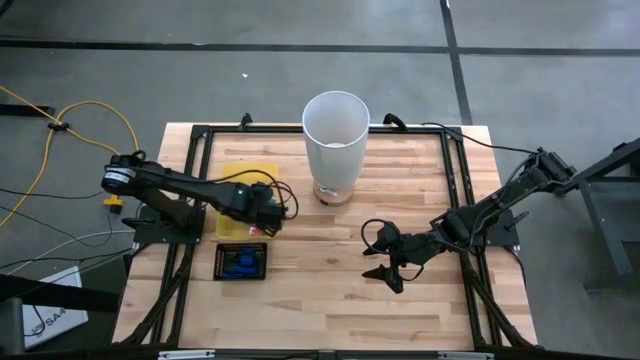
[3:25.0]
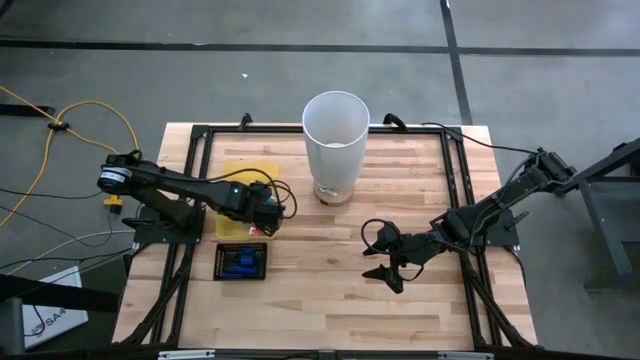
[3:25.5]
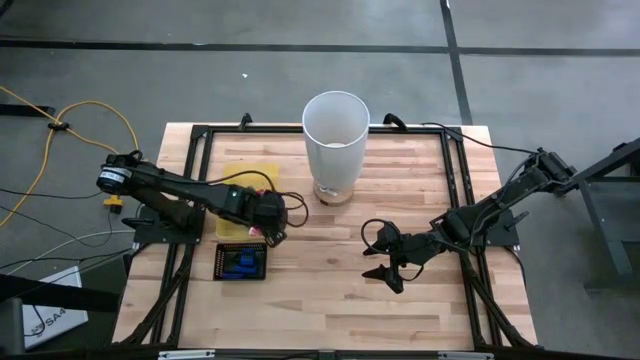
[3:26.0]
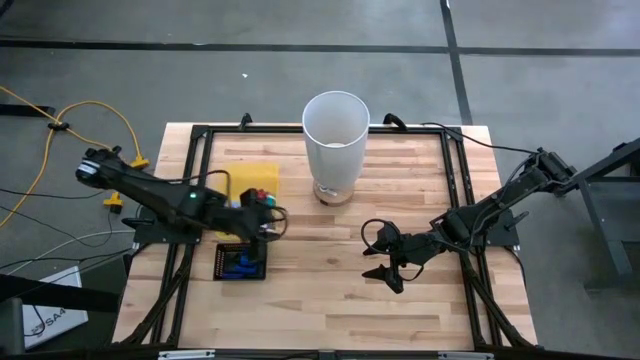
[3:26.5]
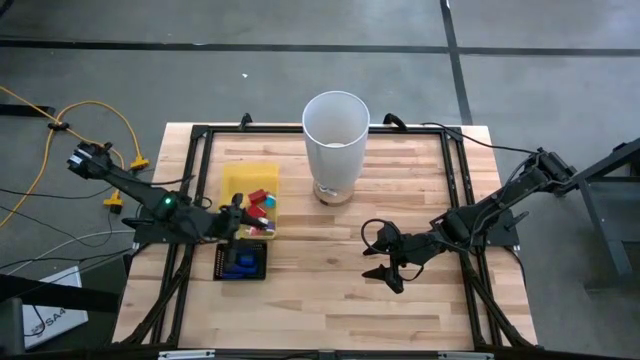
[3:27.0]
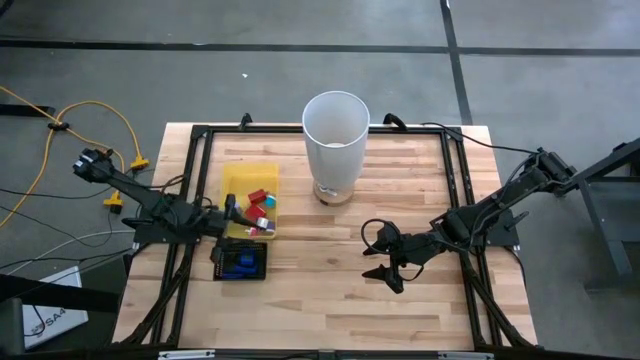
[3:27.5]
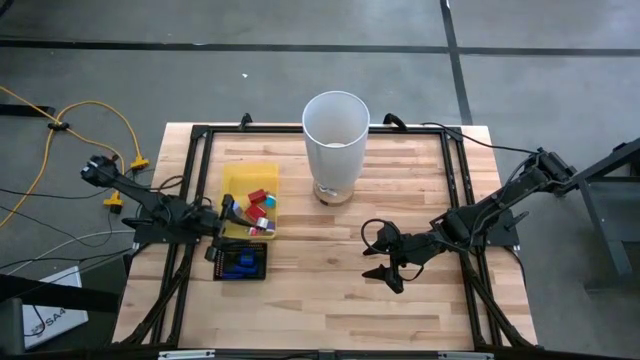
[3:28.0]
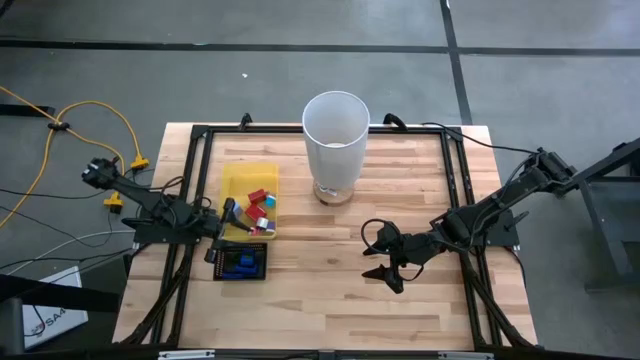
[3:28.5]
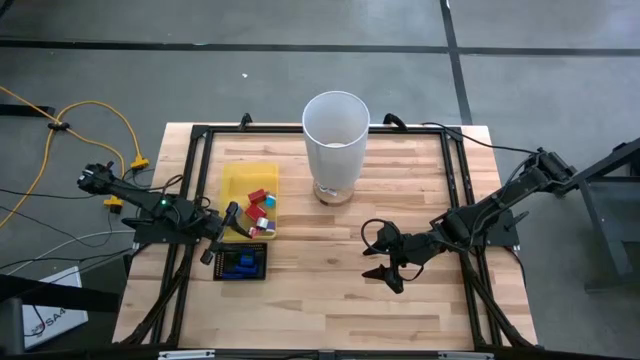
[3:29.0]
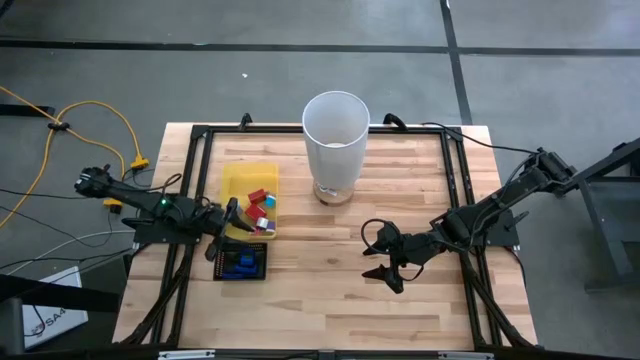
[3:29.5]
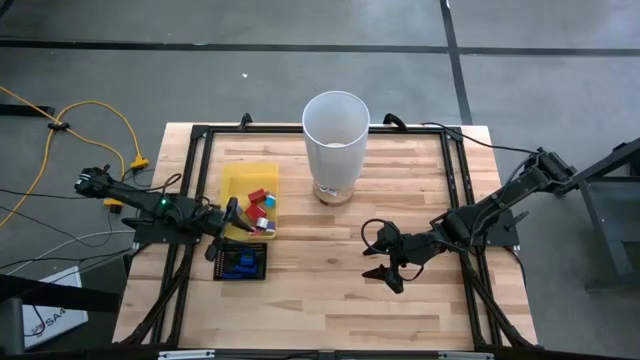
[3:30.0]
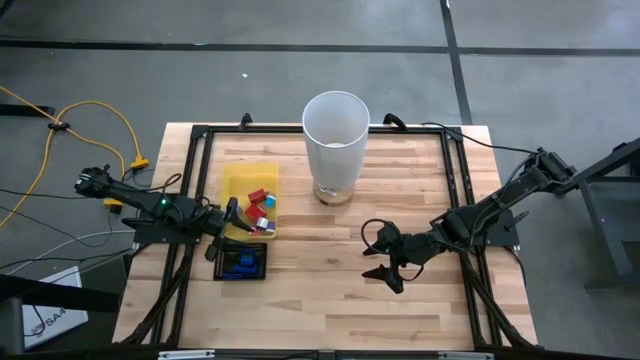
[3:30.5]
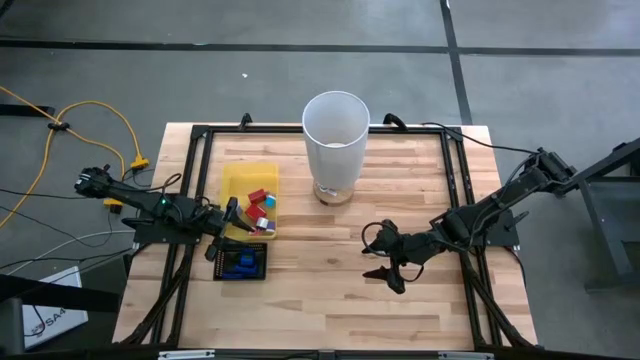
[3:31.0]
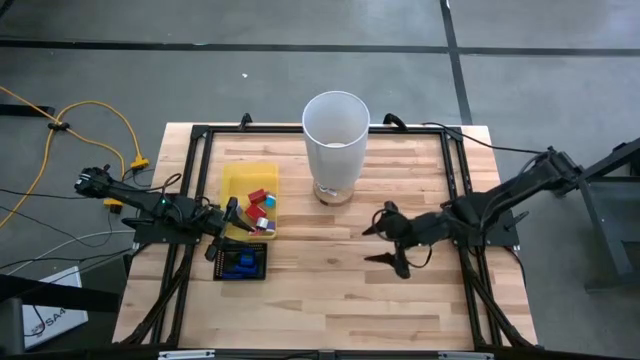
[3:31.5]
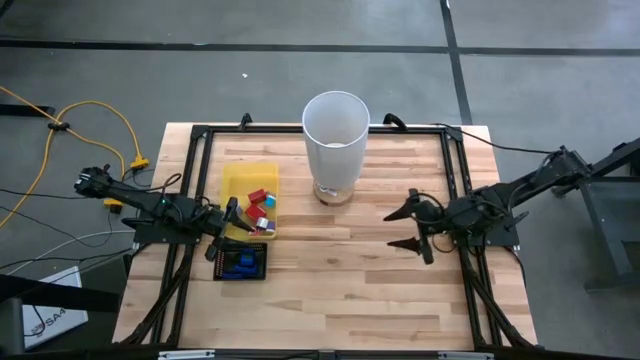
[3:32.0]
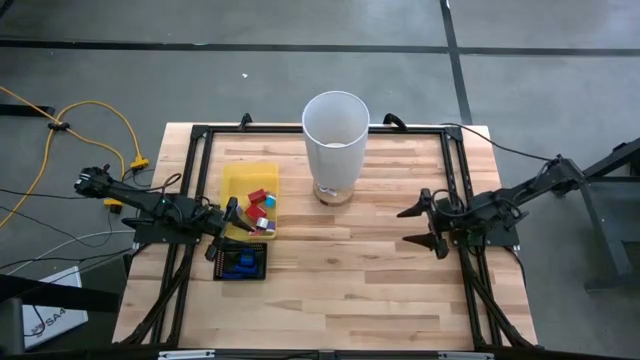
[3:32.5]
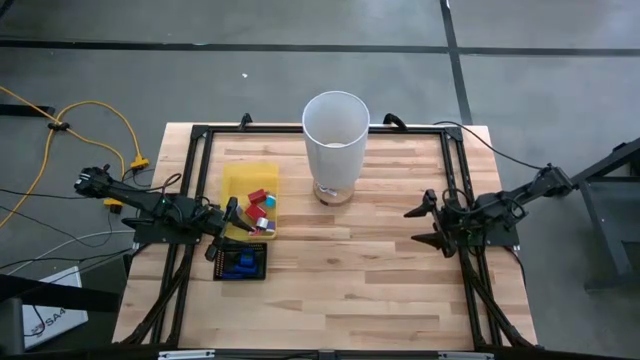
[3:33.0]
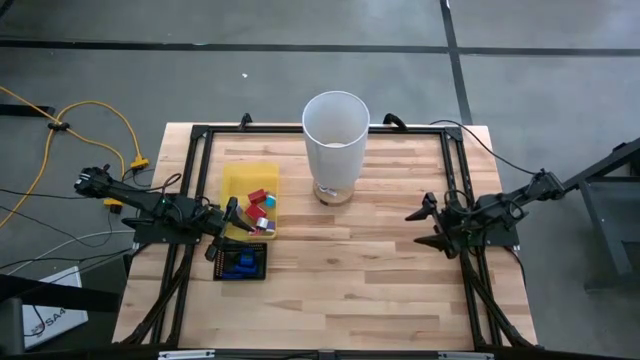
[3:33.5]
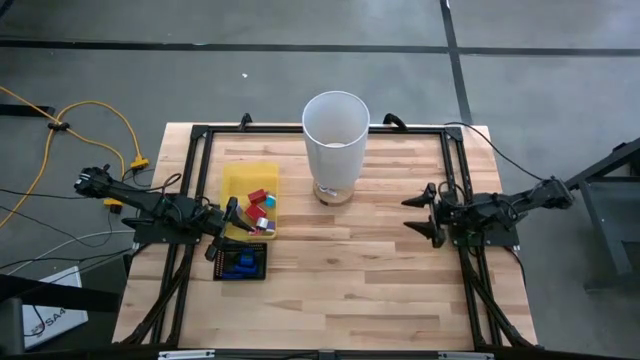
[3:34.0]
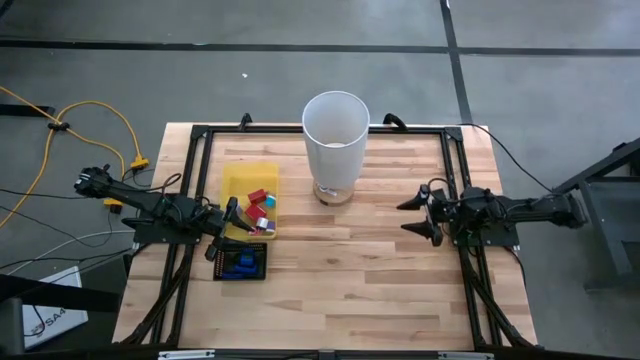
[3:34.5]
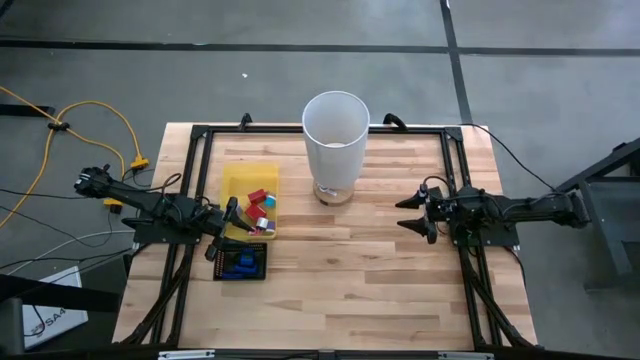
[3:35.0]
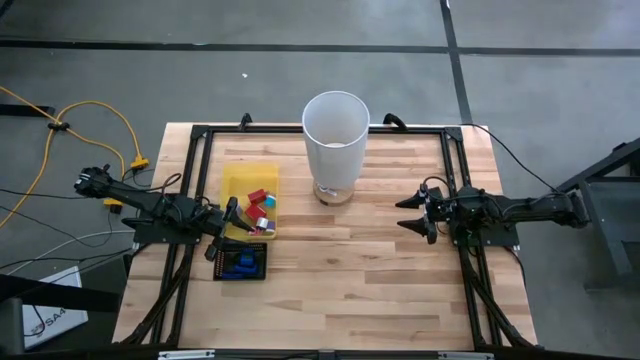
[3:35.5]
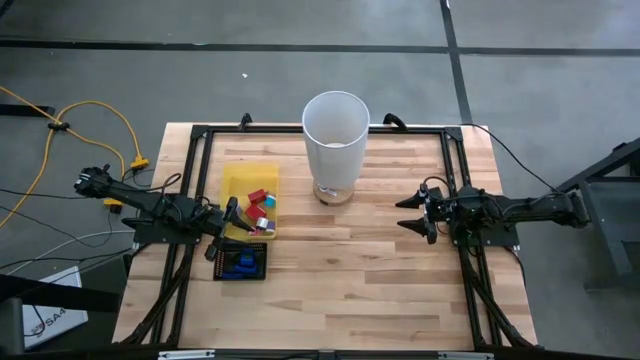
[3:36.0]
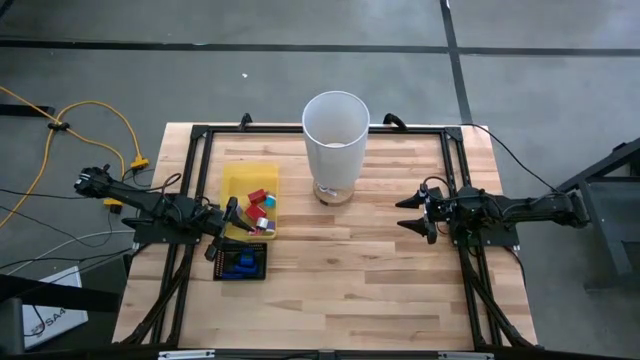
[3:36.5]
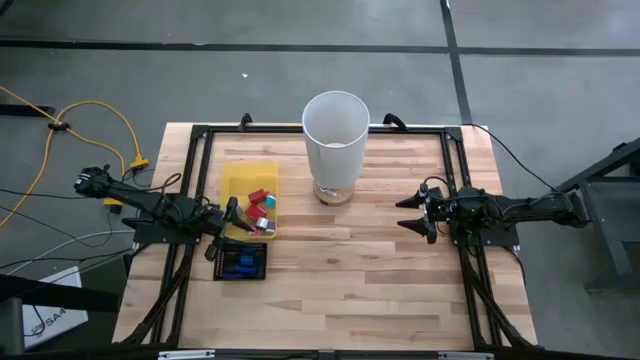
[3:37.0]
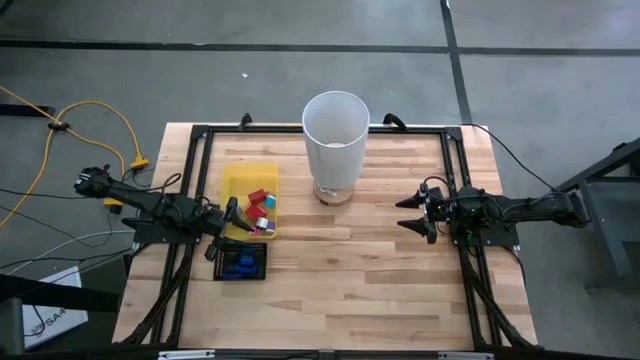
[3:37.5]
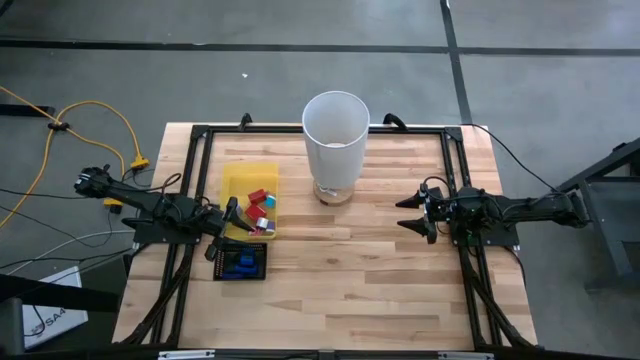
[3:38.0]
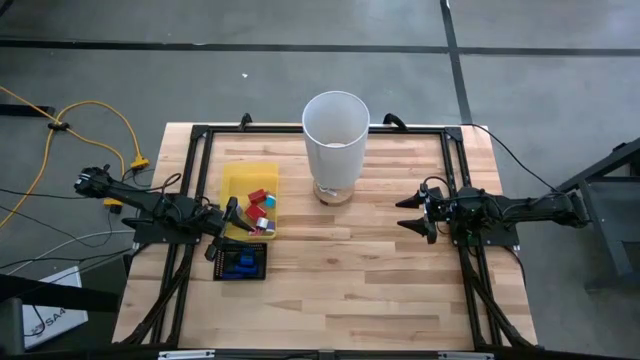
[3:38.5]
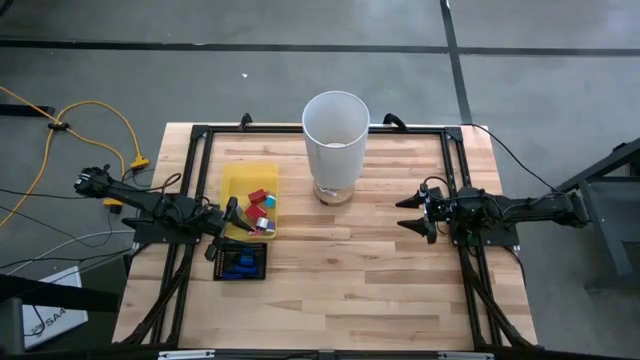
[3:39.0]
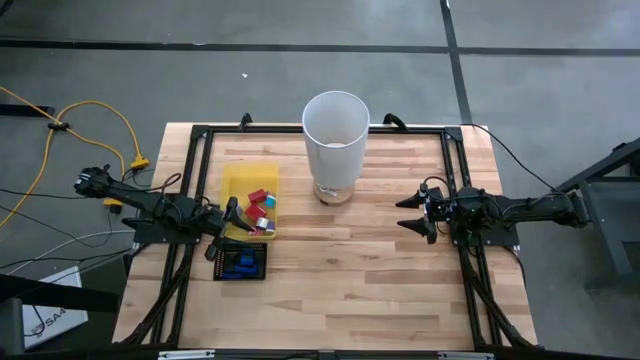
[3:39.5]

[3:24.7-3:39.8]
Task: Pick & Place Office items
Return to Home Position

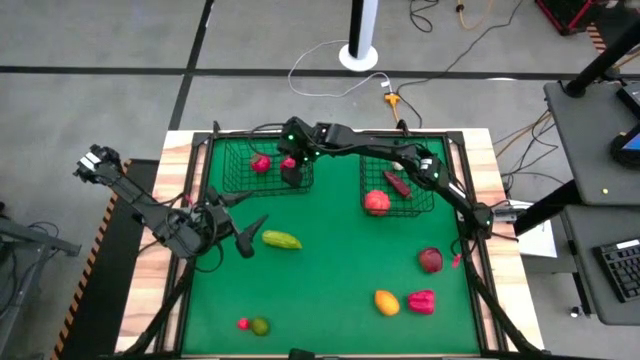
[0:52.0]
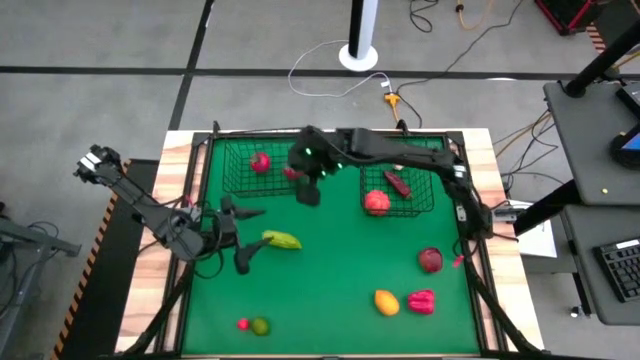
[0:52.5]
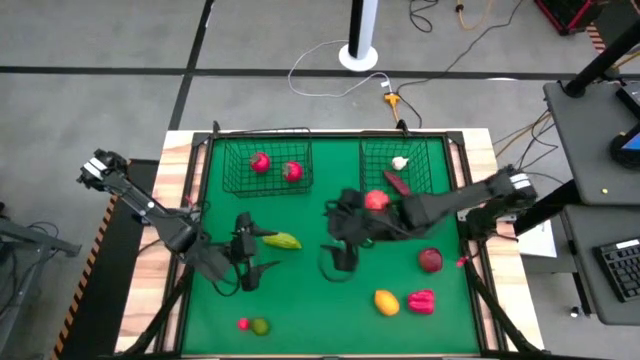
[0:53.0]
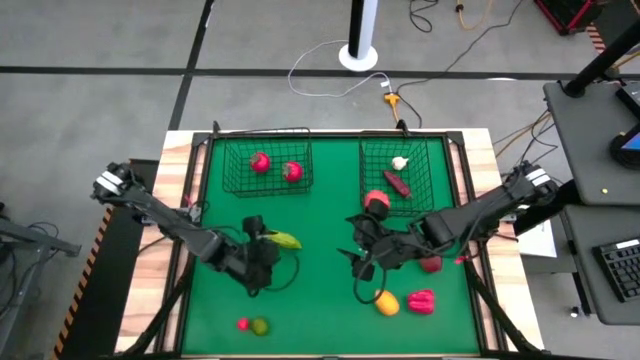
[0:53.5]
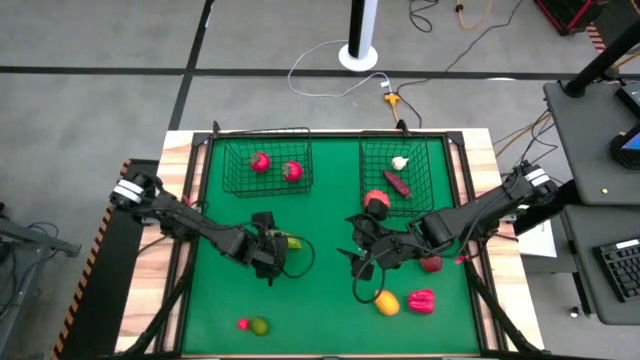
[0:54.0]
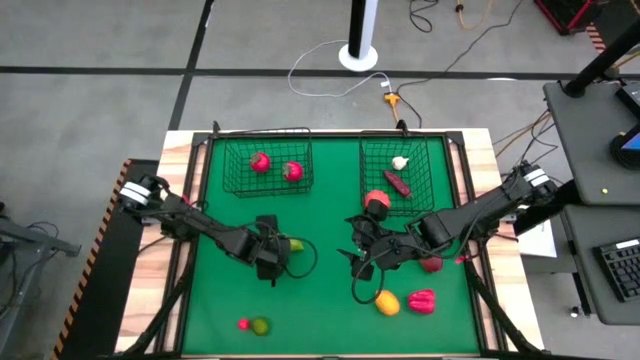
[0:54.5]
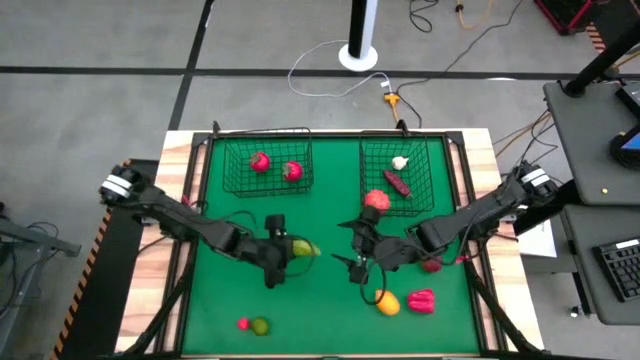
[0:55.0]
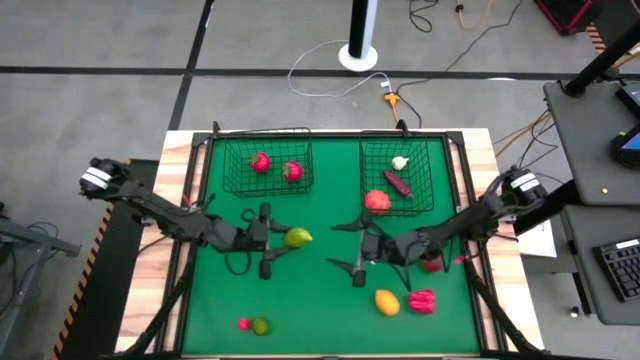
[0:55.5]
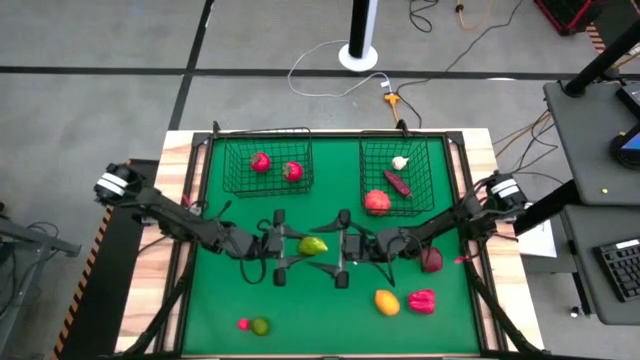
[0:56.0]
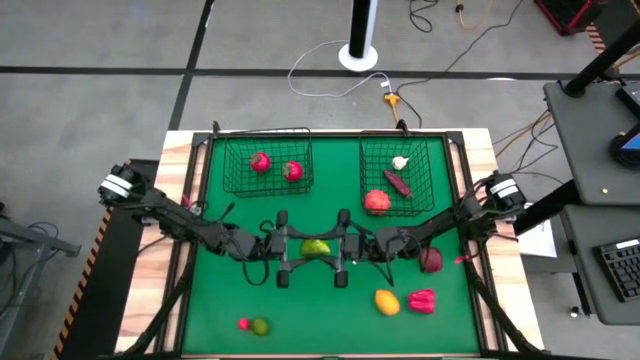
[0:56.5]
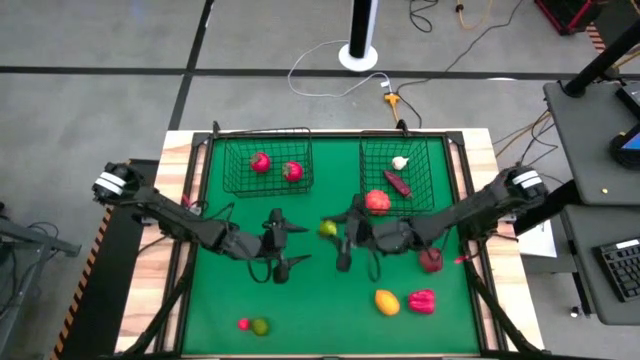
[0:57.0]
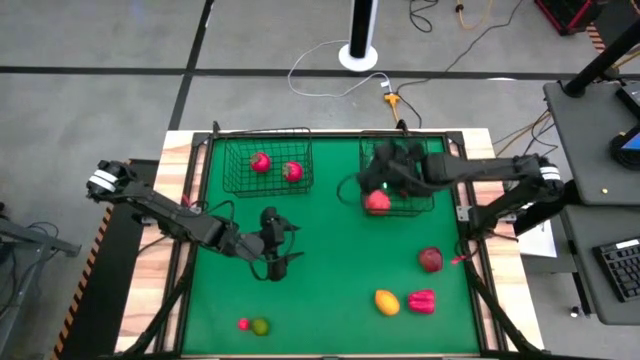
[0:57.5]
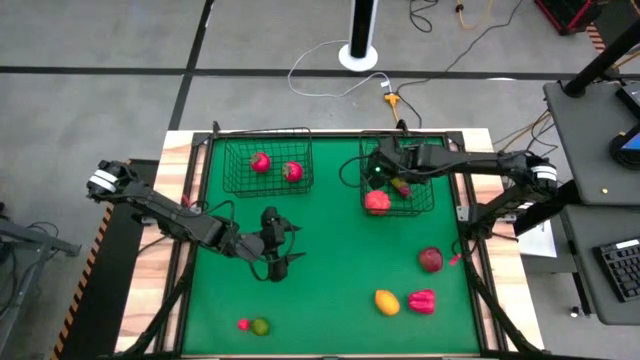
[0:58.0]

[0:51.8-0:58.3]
Task: Sort produce into baskets
Put the green cucumber into the right wire basket

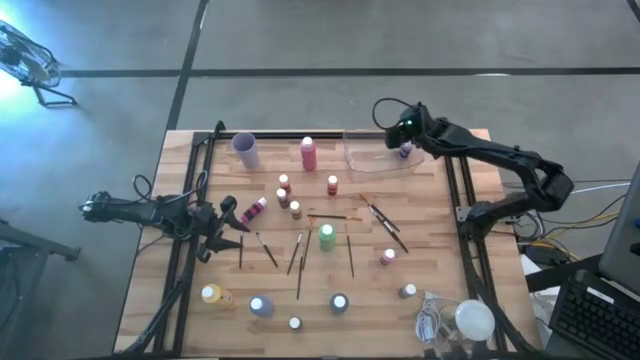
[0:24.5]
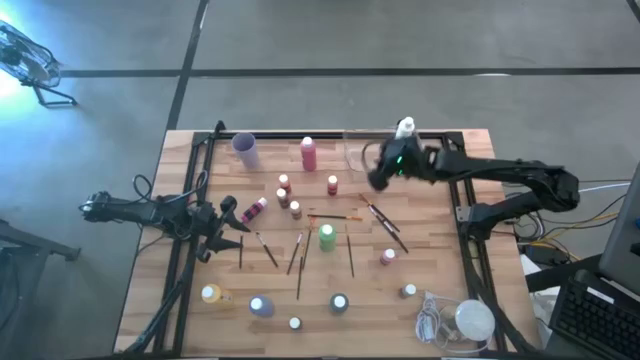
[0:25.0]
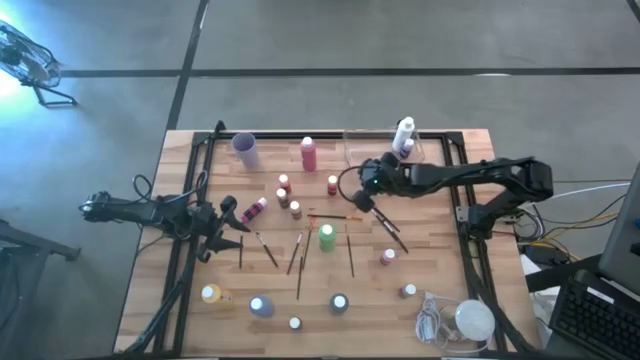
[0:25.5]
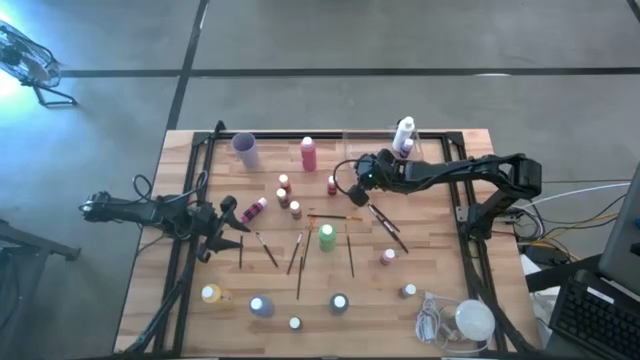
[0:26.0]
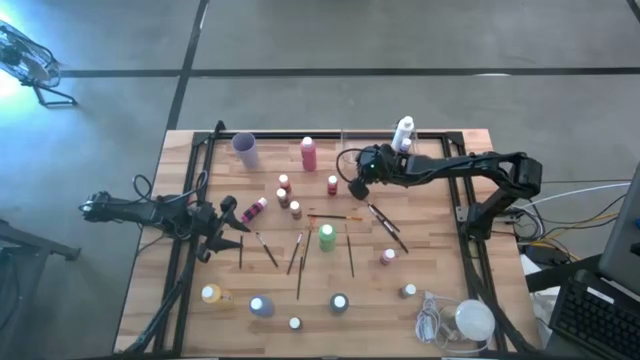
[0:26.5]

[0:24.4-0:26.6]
Task: Pick & Place Paint Supplies
Adjust the transparent bin
